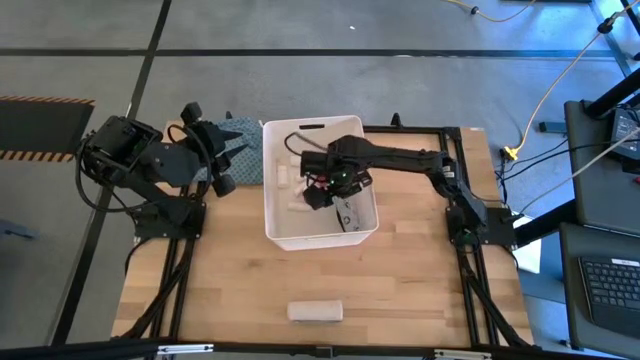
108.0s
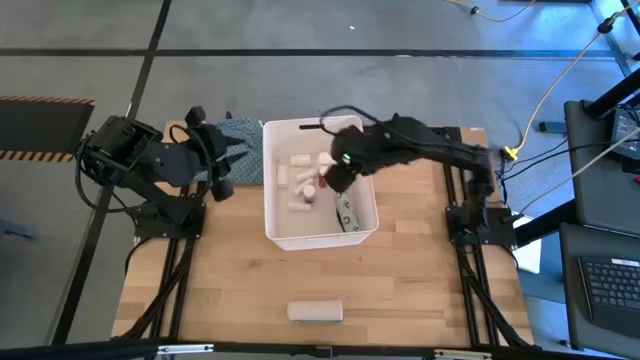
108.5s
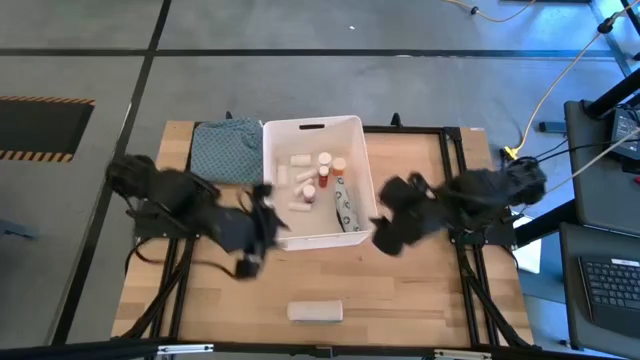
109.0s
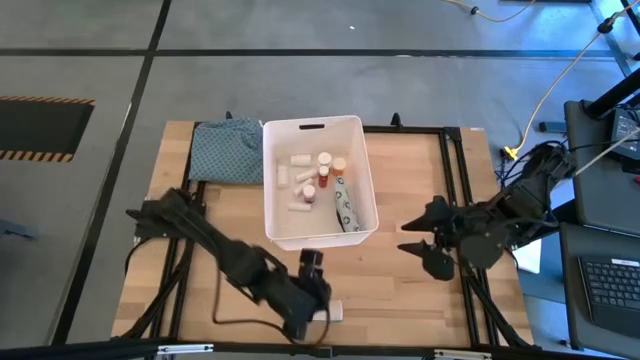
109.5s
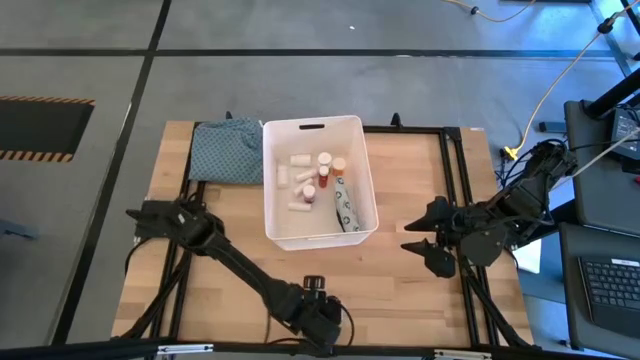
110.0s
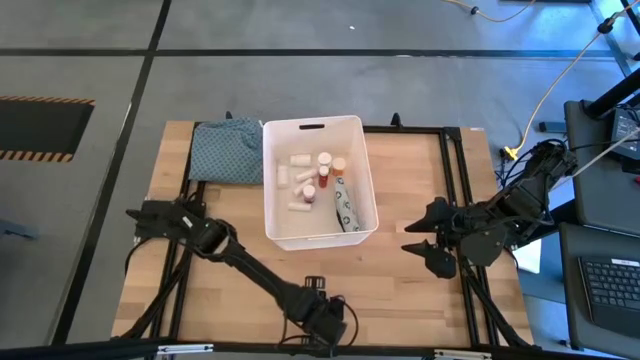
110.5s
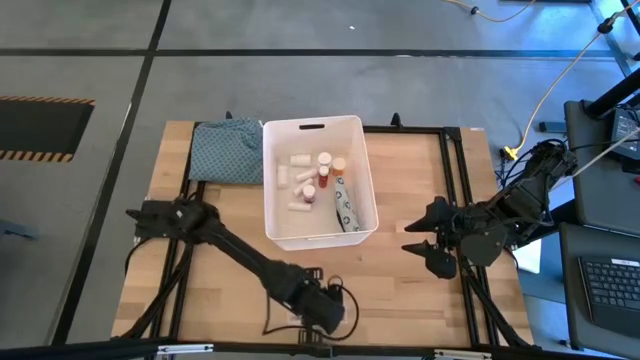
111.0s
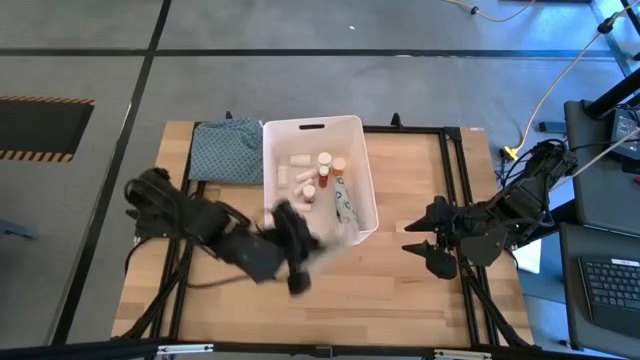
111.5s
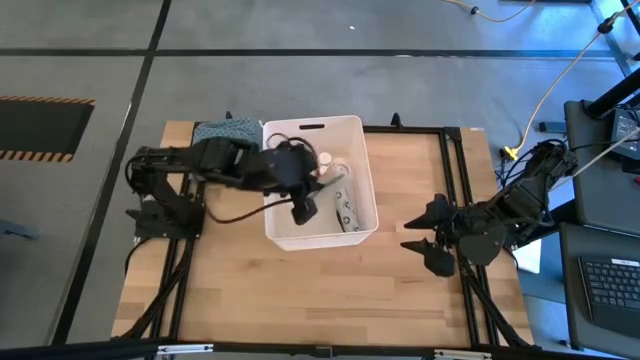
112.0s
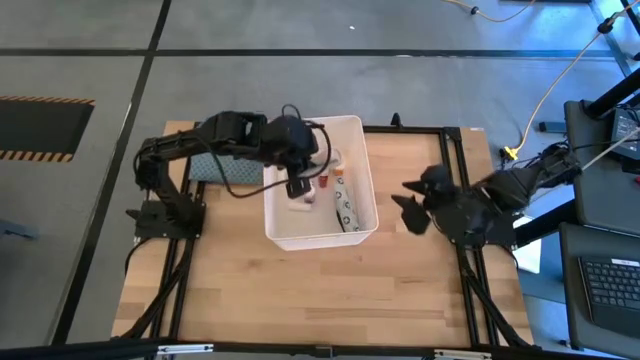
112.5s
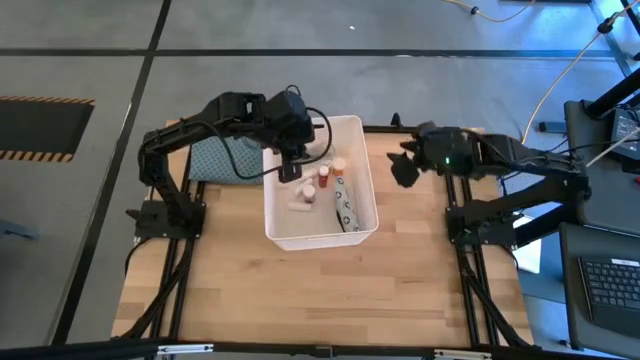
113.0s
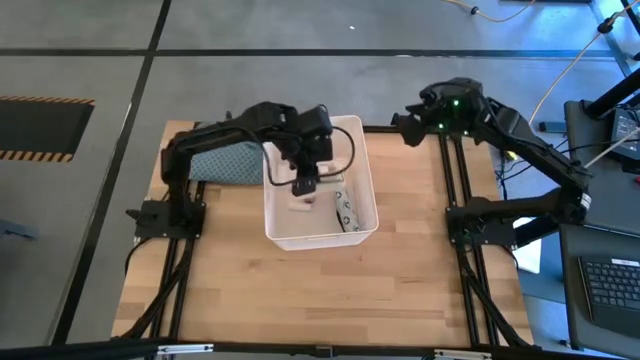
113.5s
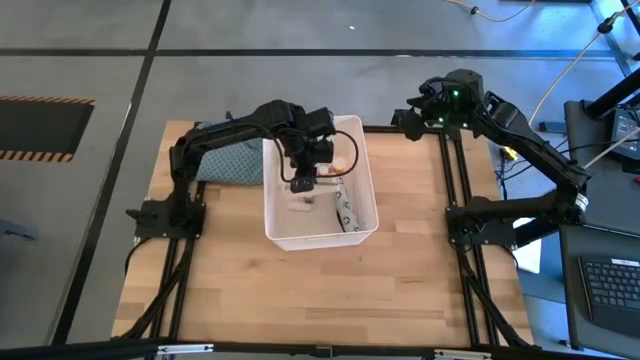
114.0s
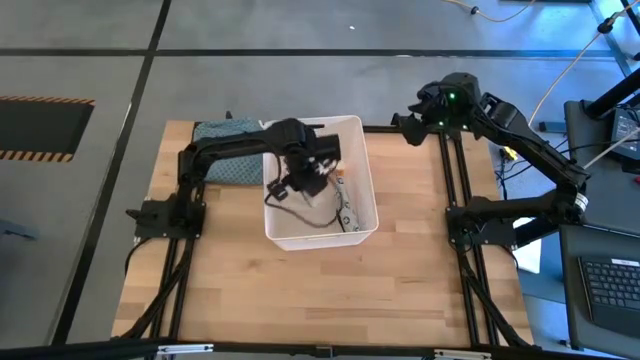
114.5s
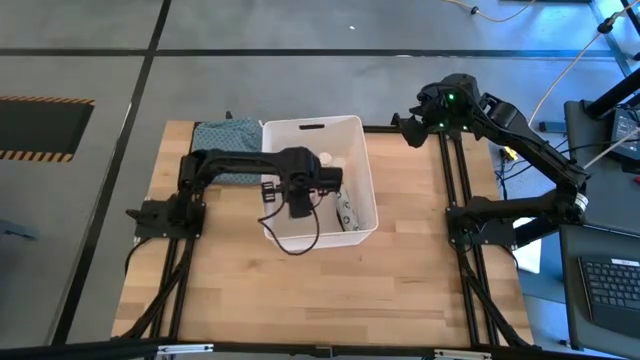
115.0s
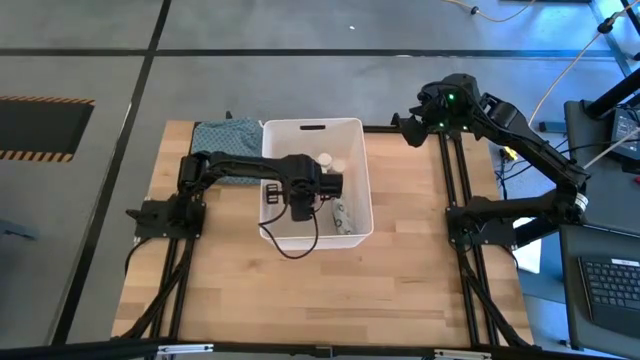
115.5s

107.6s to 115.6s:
Task: Pick & place medical supplies in basket/bin
Put the light brown bandage into the white bin

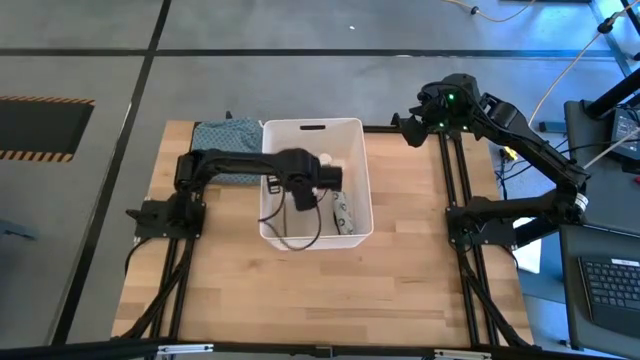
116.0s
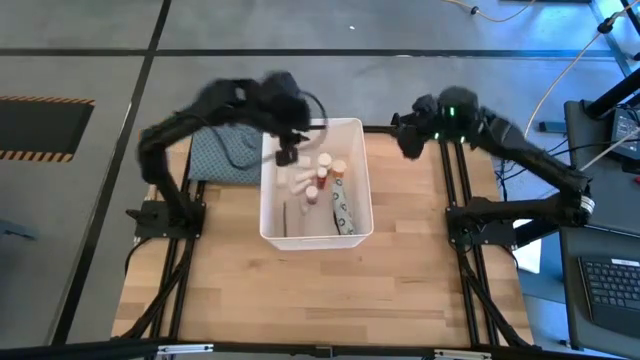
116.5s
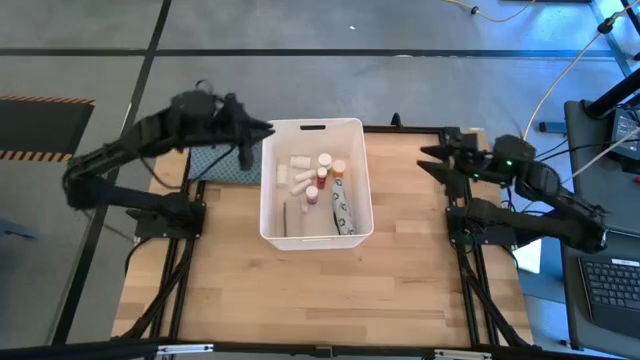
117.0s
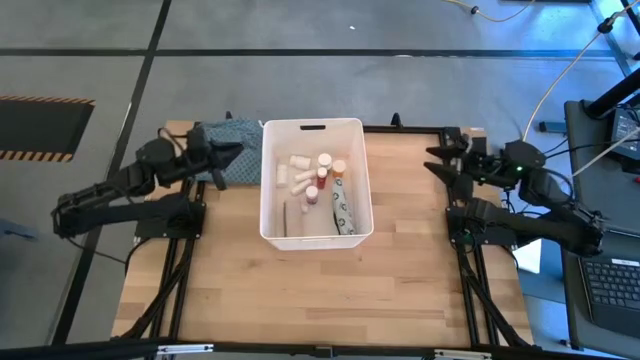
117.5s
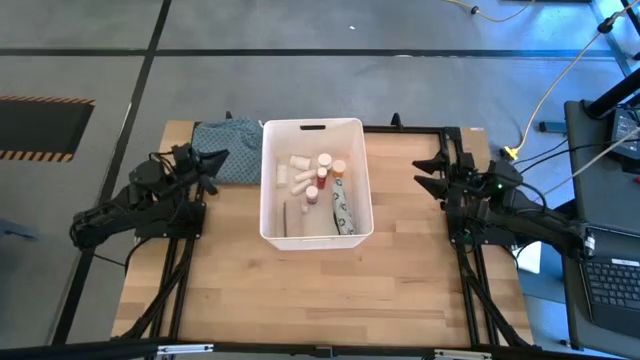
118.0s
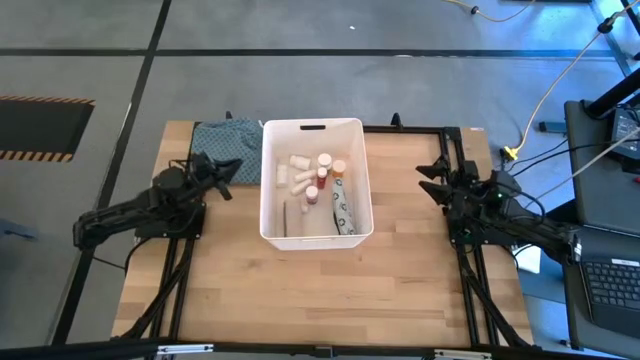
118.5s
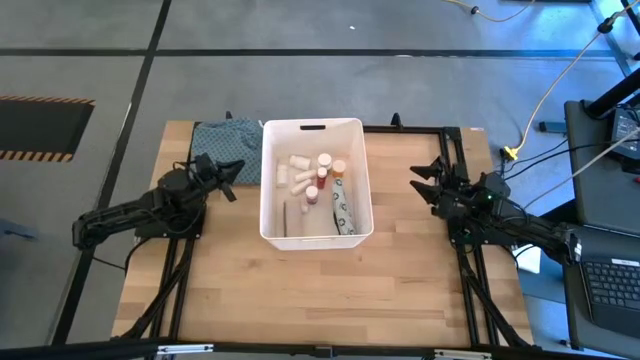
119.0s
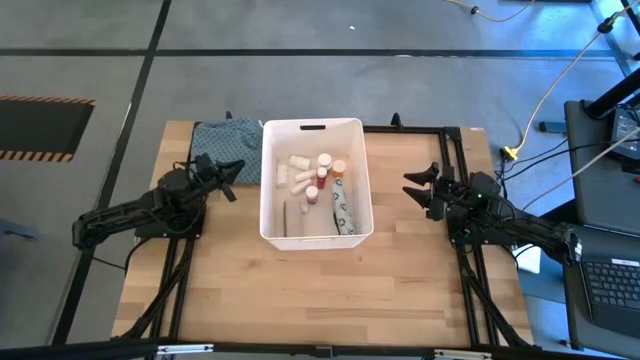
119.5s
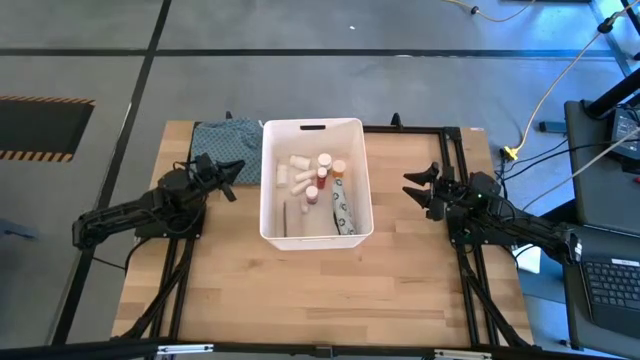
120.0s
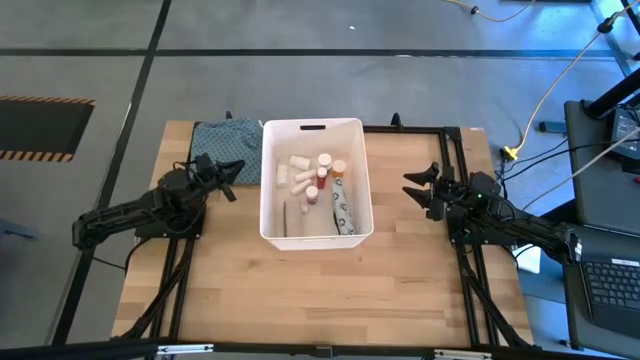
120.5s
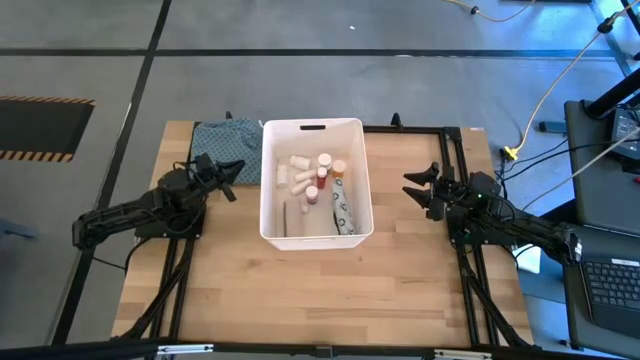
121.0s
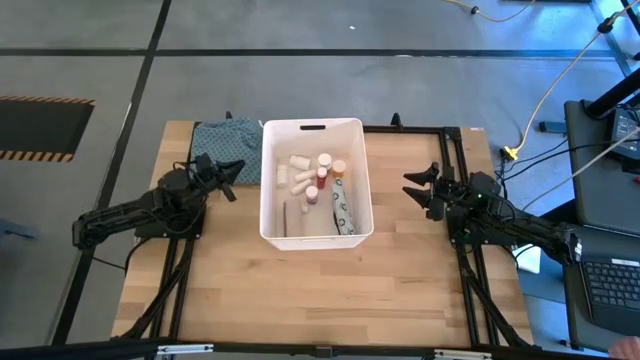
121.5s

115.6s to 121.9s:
Return to Home Position

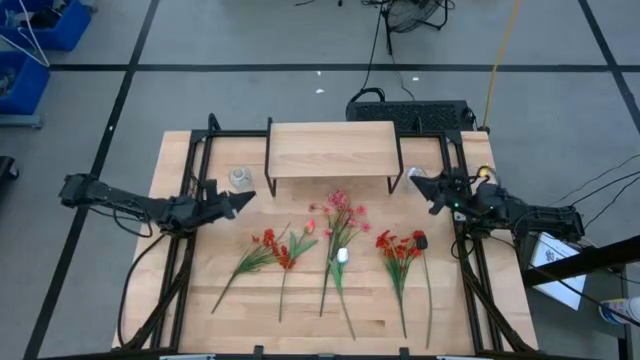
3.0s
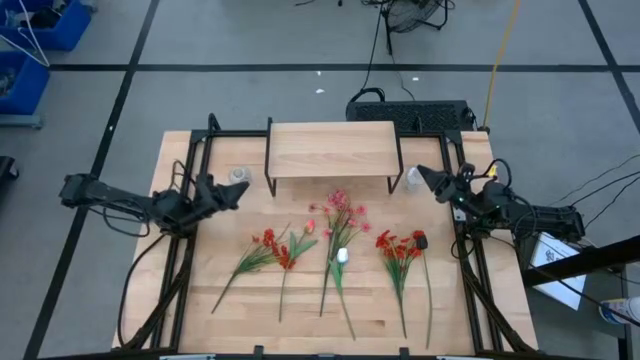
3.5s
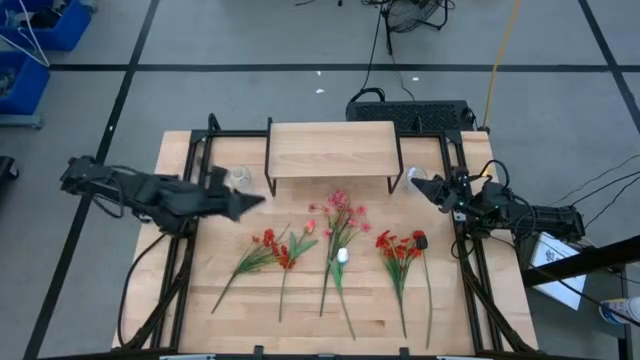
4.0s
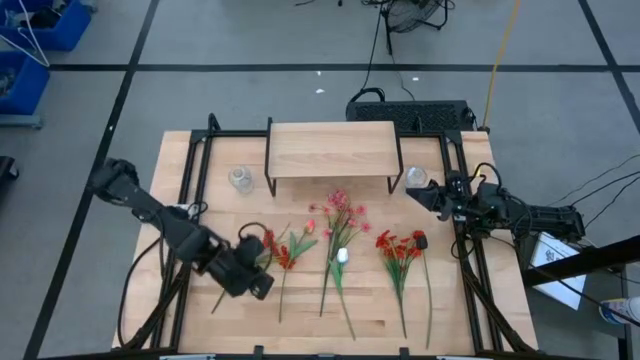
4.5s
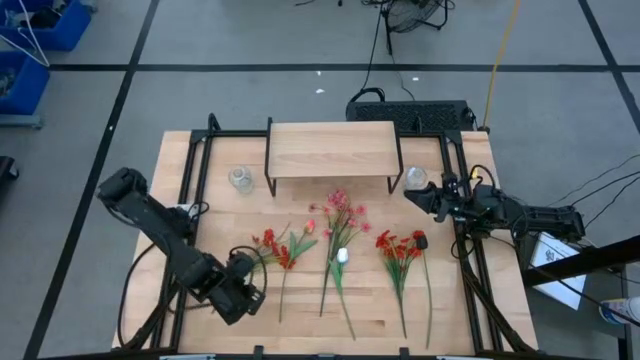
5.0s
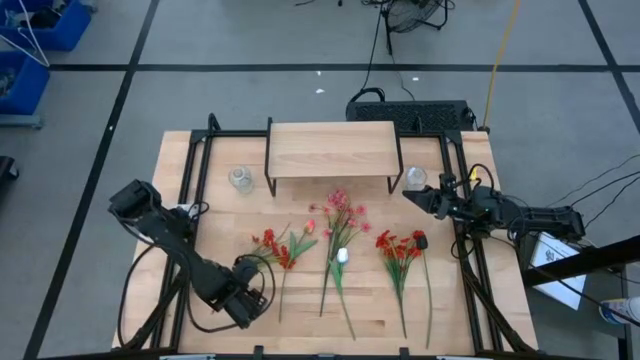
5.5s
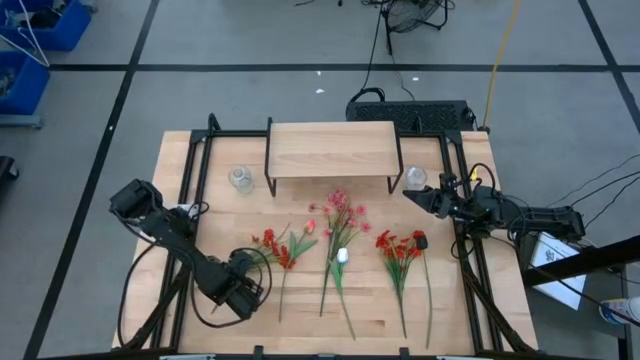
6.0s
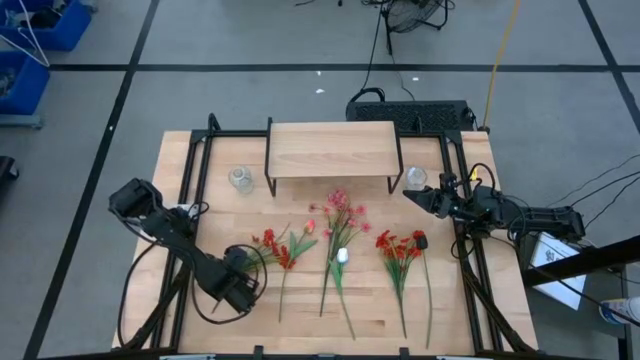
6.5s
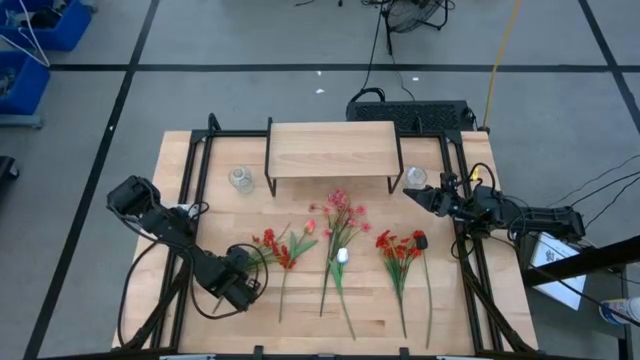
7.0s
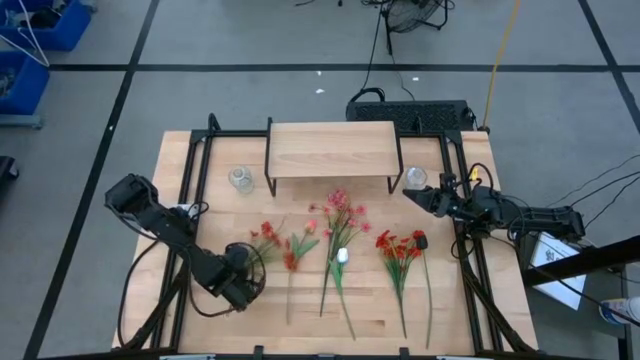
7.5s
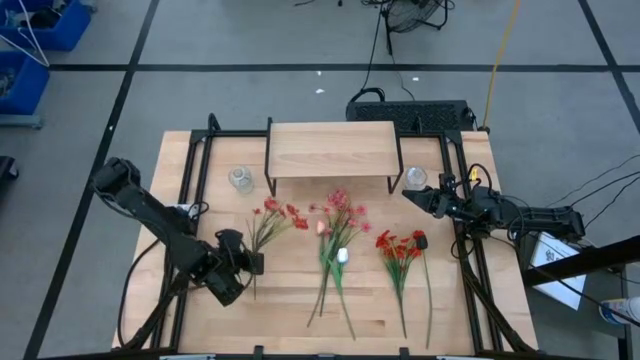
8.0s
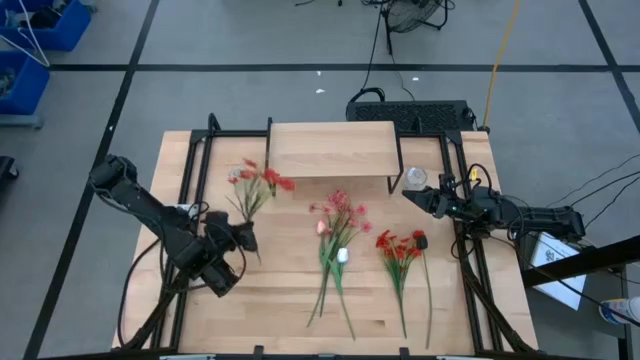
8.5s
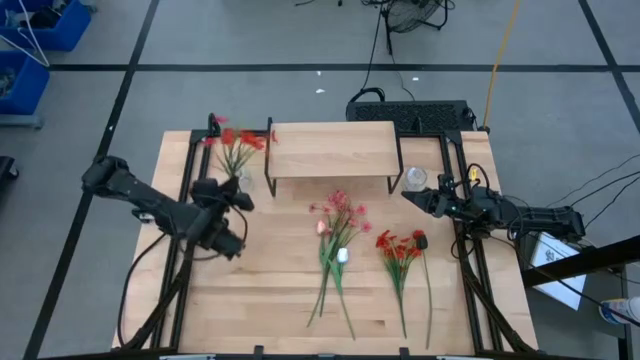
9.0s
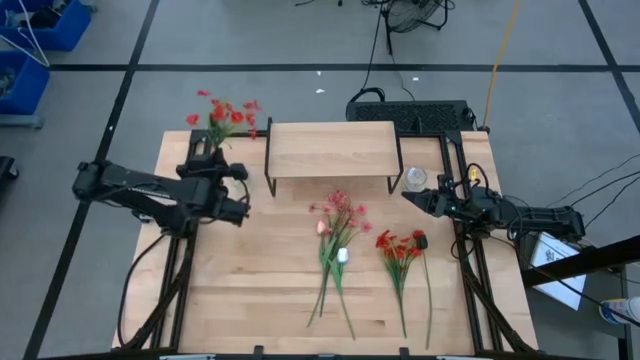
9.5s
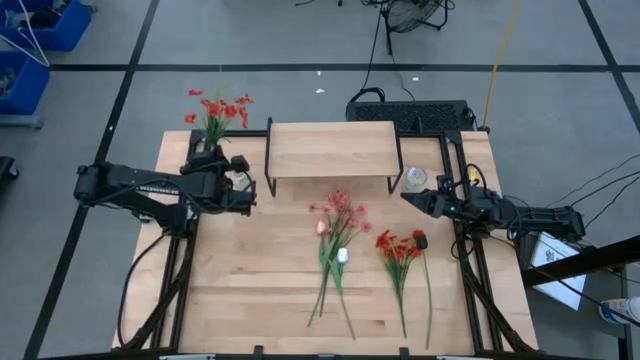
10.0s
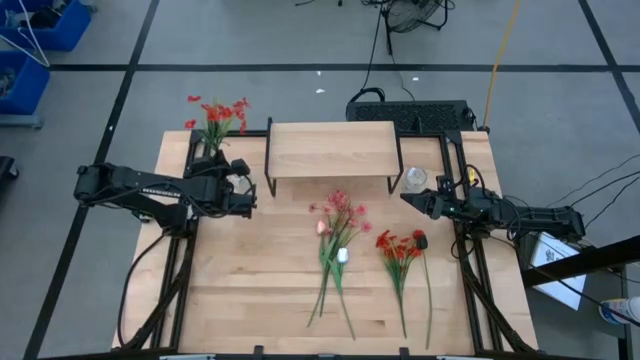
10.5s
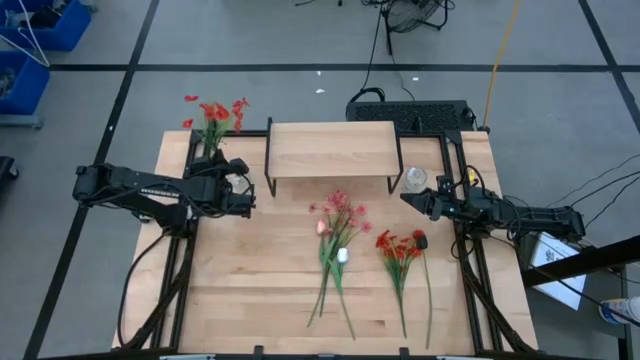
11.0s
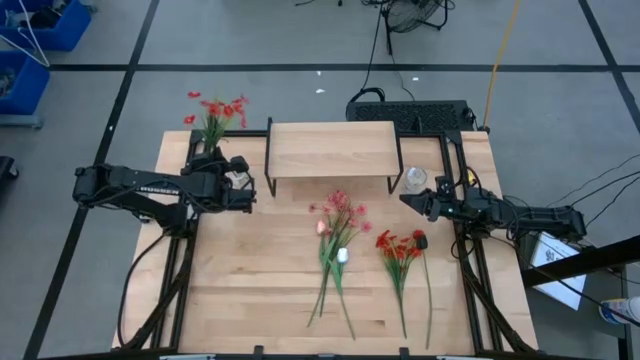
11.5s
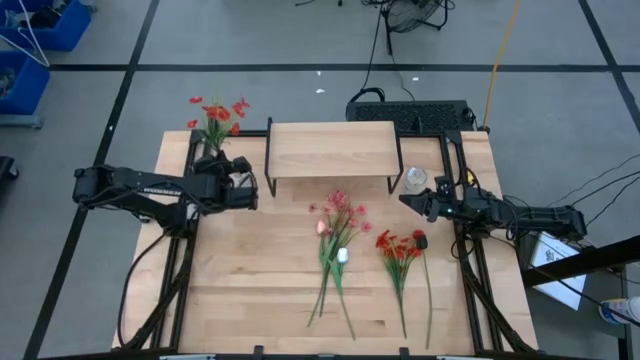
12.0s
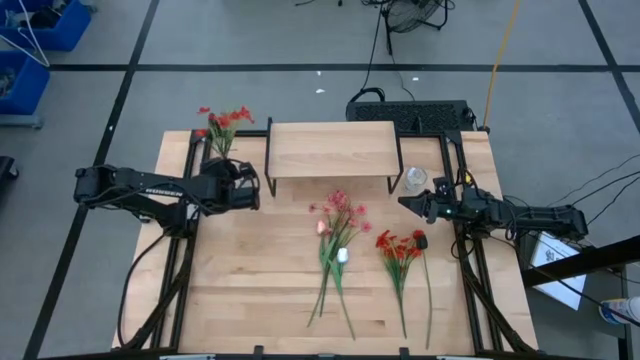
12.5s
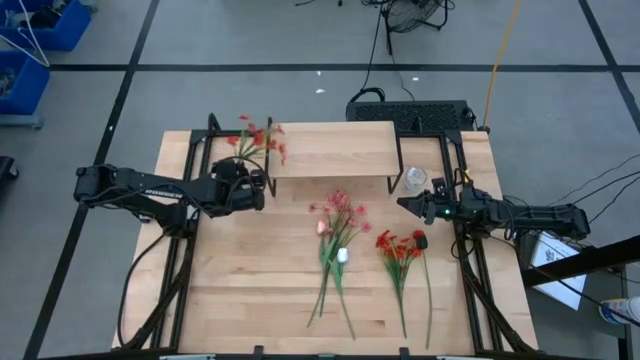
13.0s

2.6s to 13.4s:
Task: Pick and place flowers into a vace then onto a shelf
Put the left orange flowers into the left transparent vase
